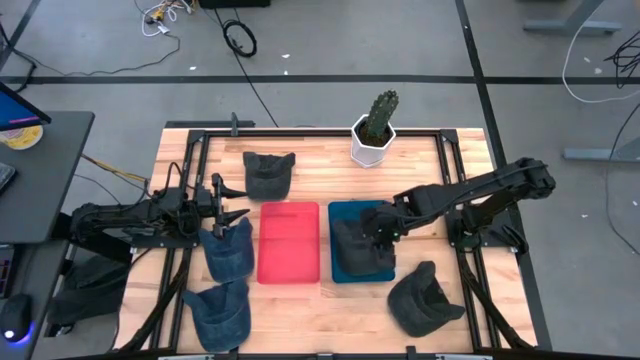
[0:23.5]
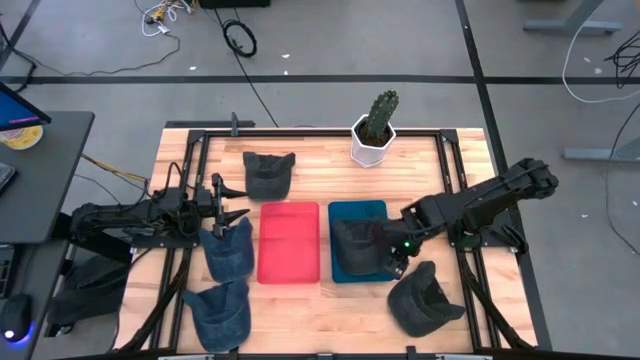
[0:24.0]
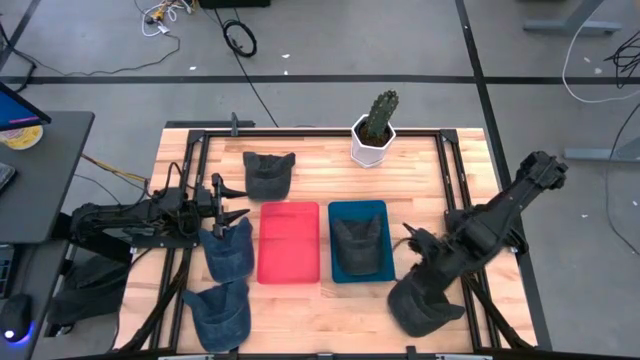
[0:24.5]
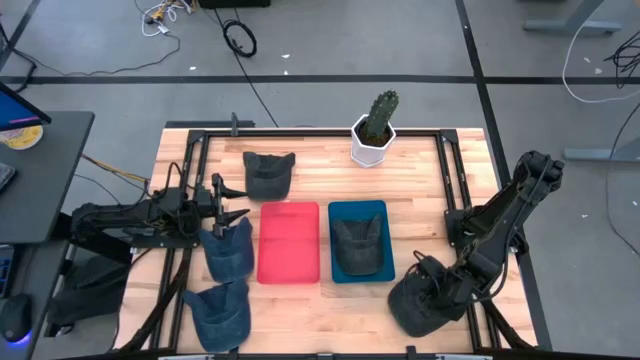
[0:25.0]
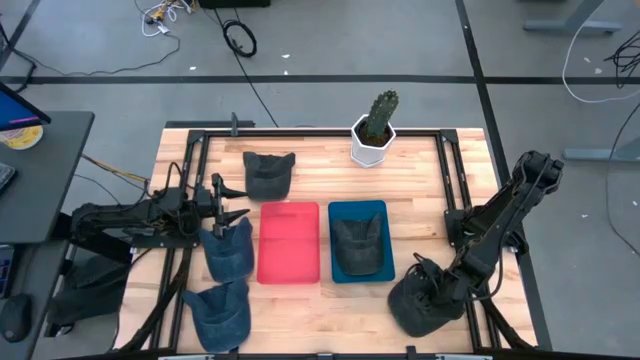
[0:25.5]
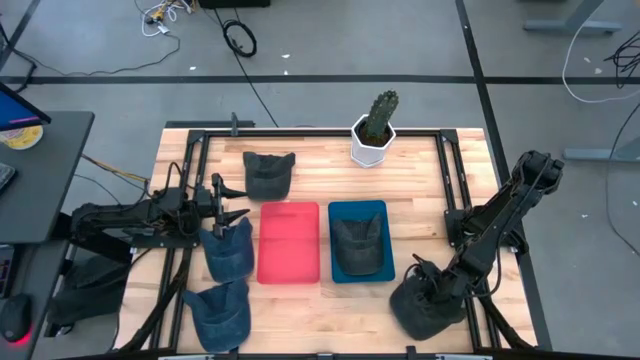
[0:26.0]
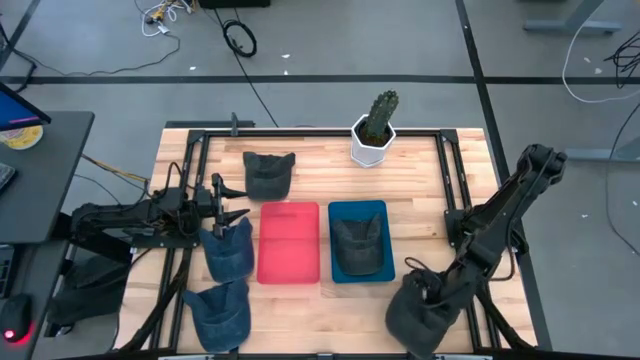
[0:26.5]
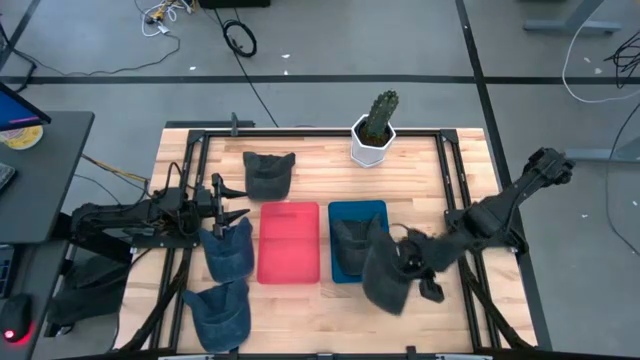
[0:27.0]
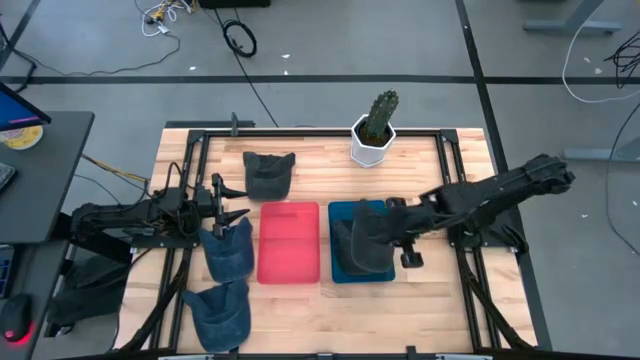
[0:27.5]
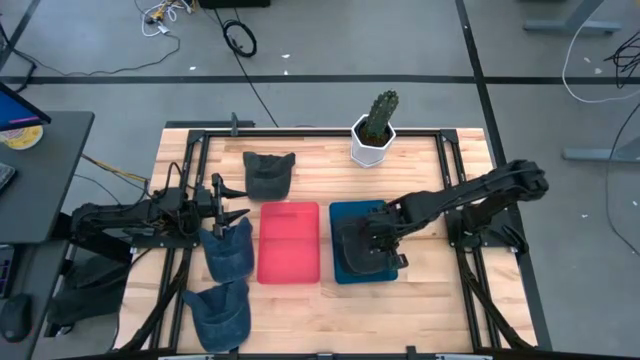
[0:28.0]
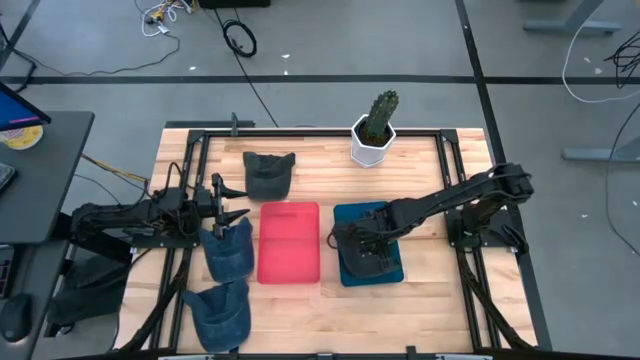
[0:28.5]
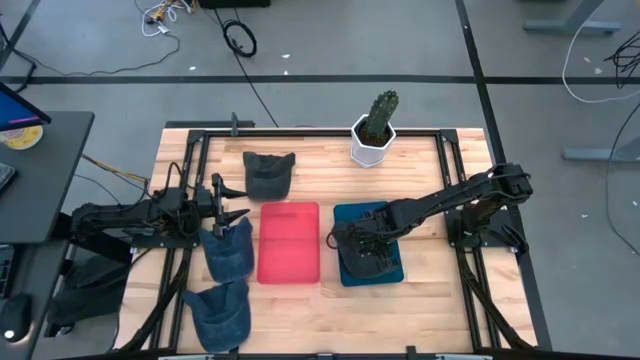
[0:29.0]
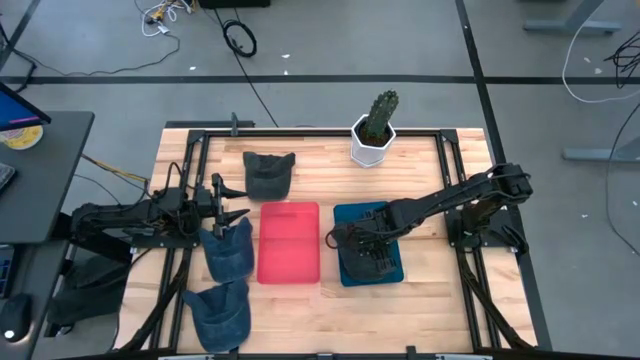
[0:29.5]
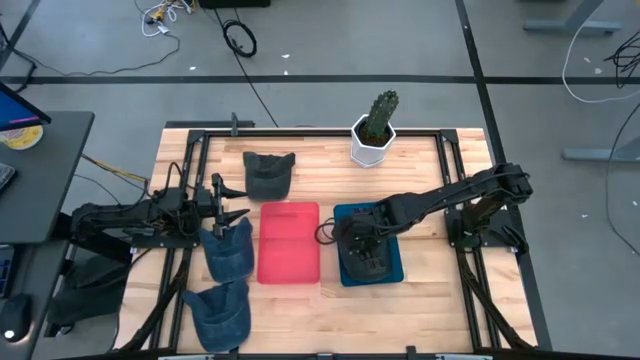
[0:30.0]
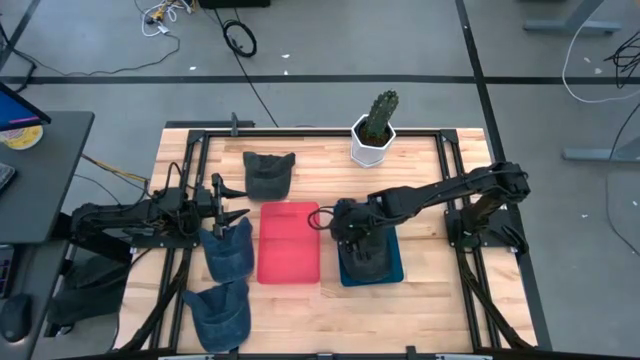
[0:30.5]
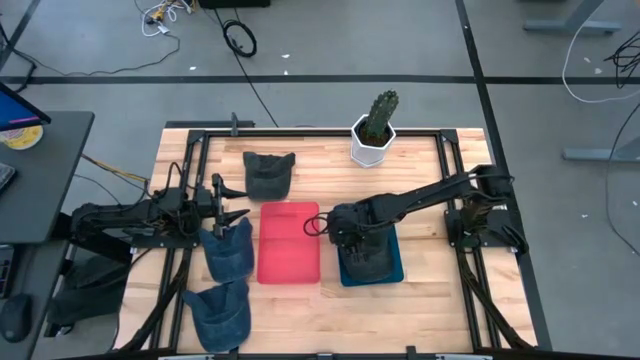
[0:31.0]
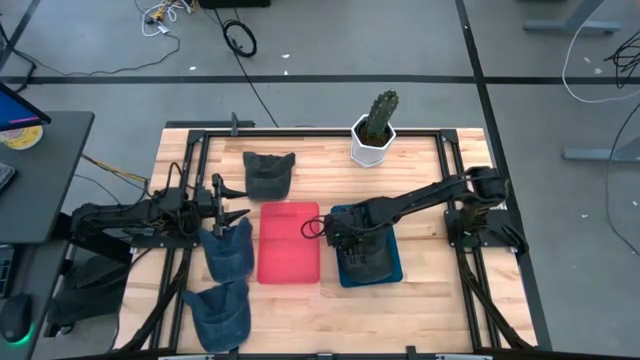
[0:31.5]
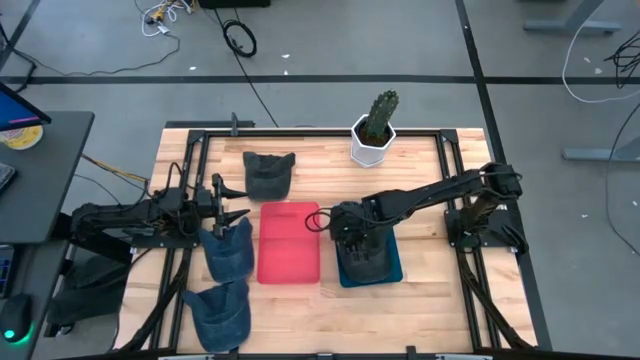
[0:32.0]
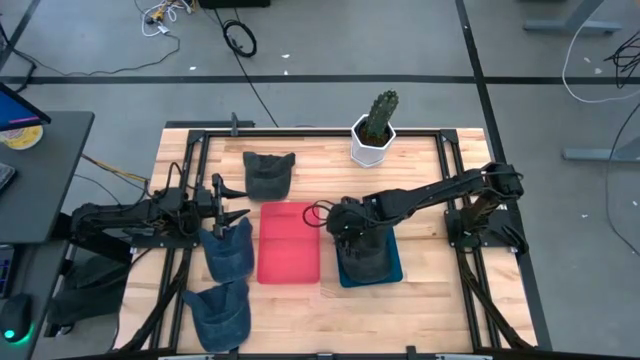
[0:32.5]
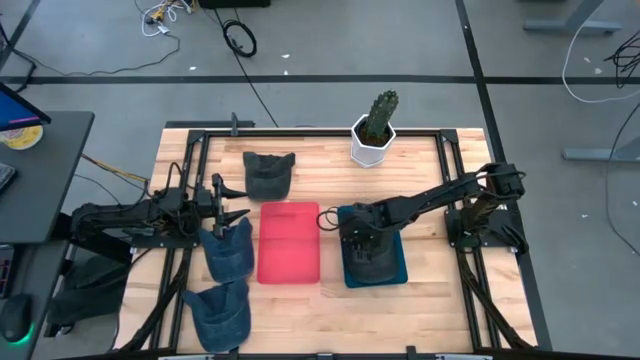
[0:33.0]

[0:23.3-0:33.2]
Task: Pick & Place hat
Put the bottom gray cap into the bin

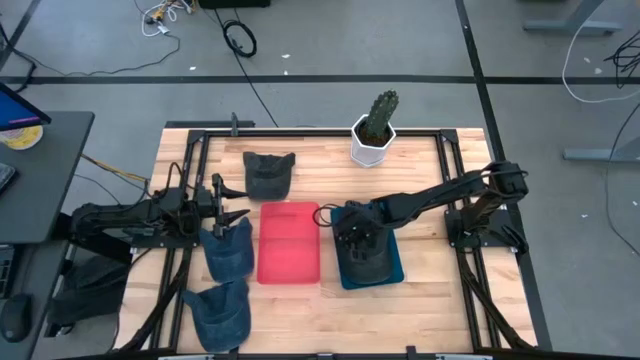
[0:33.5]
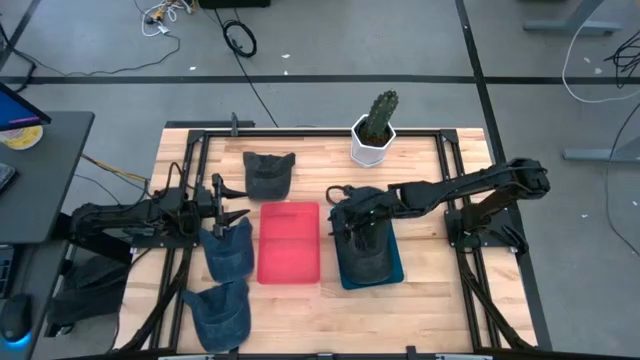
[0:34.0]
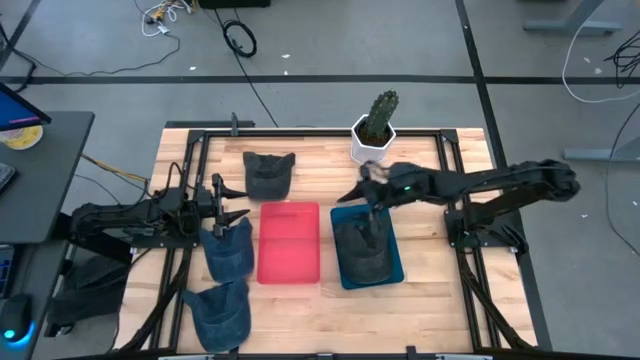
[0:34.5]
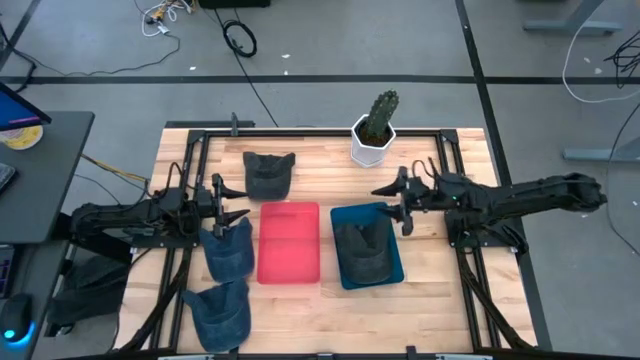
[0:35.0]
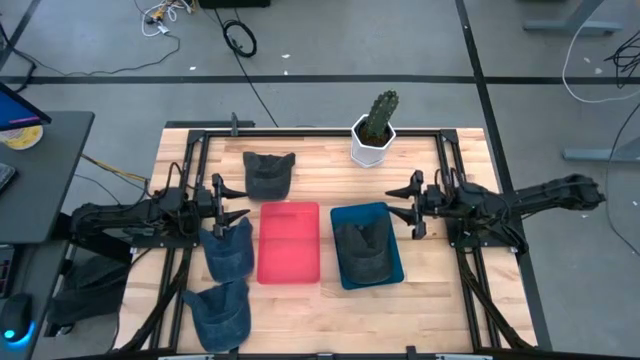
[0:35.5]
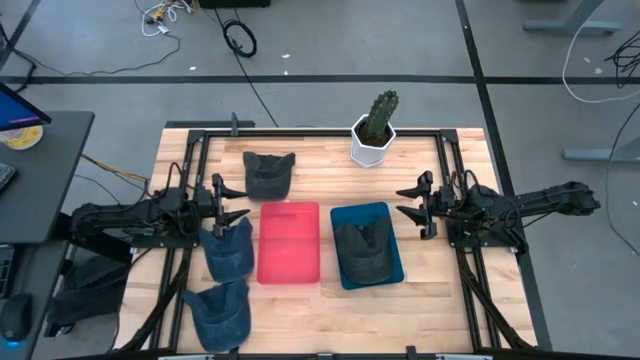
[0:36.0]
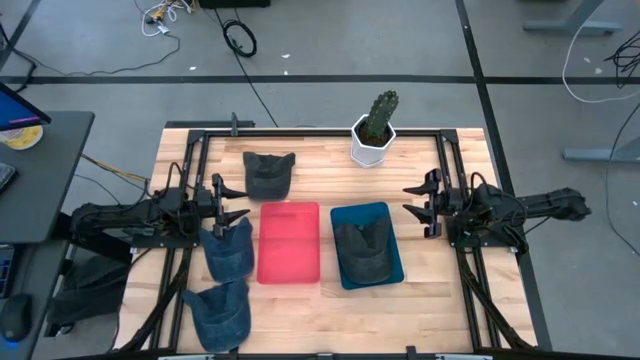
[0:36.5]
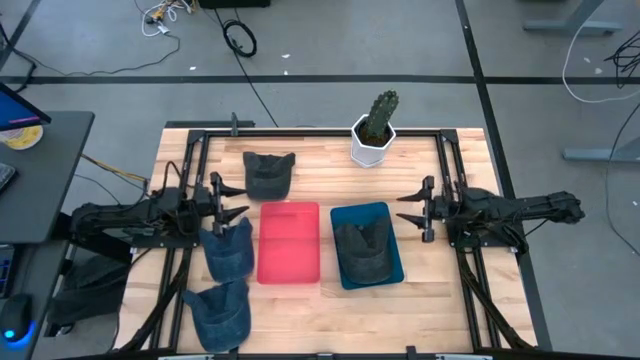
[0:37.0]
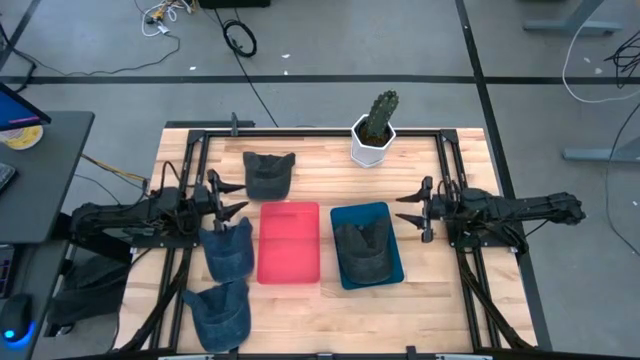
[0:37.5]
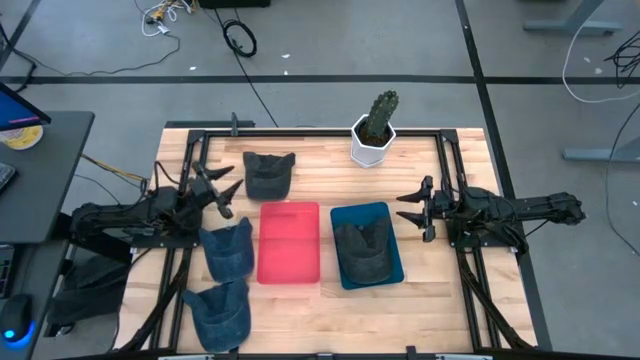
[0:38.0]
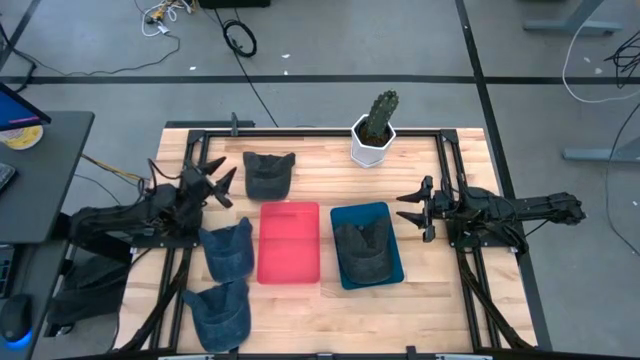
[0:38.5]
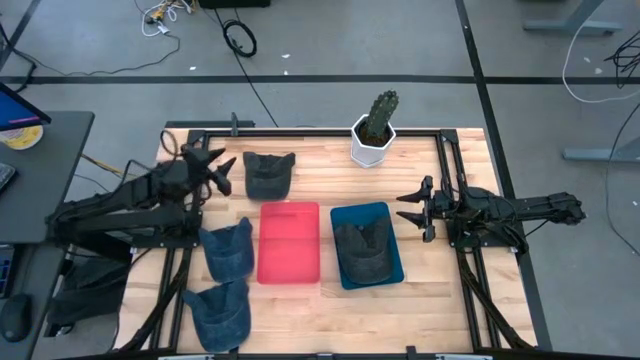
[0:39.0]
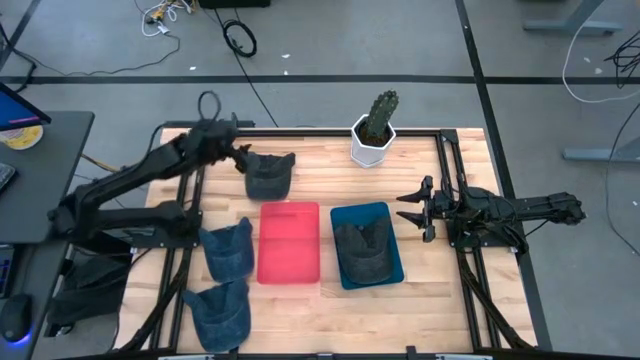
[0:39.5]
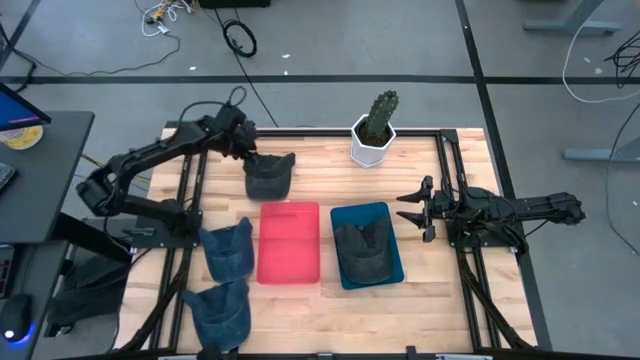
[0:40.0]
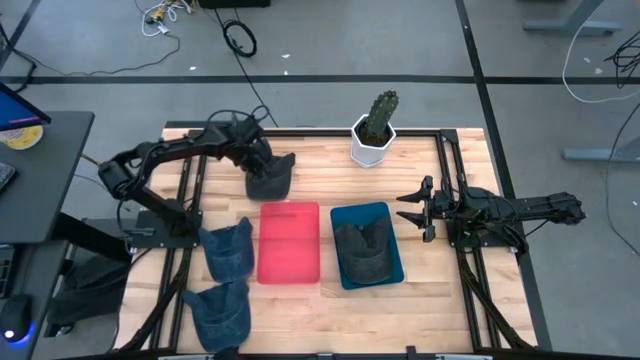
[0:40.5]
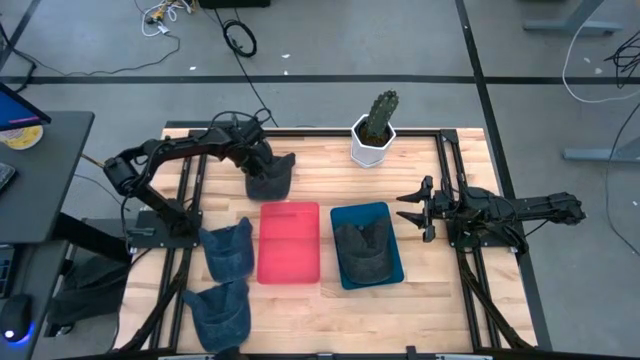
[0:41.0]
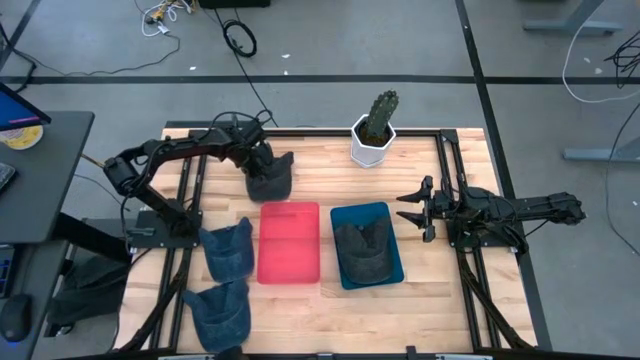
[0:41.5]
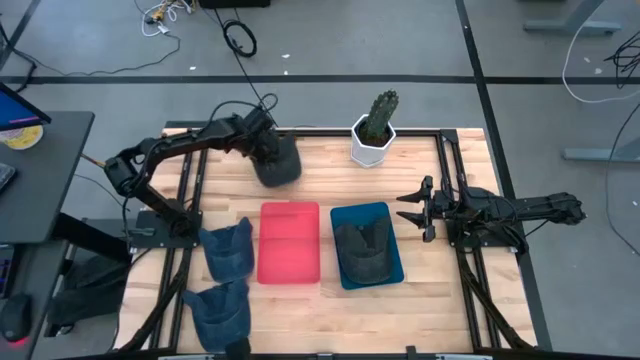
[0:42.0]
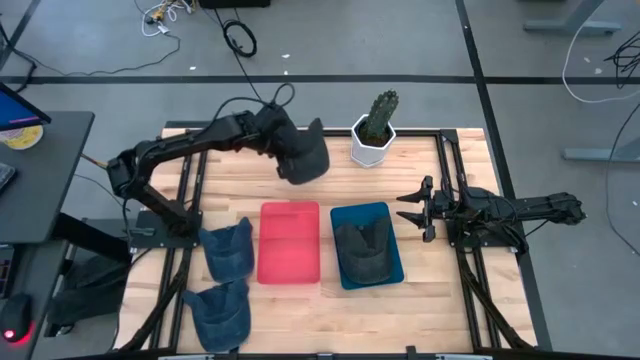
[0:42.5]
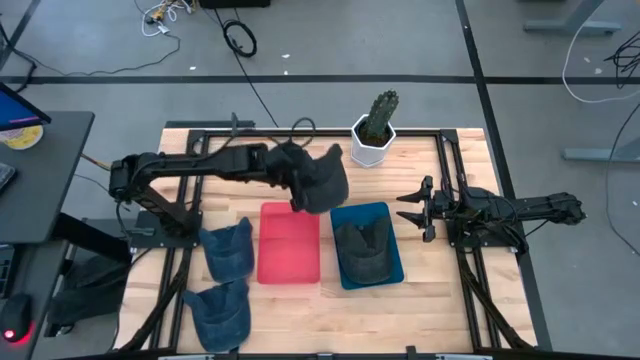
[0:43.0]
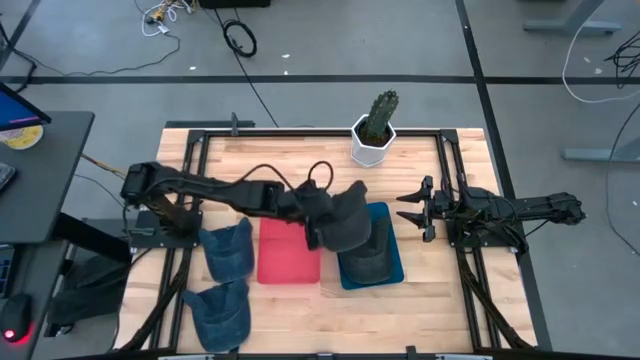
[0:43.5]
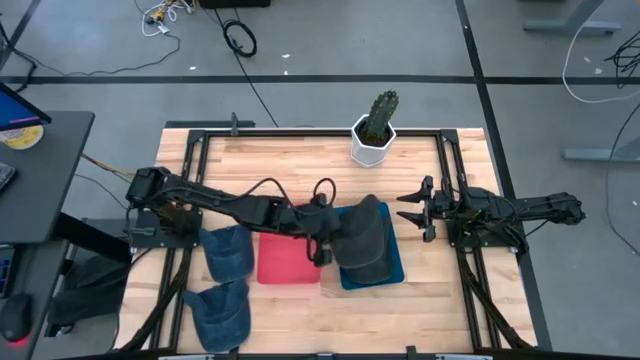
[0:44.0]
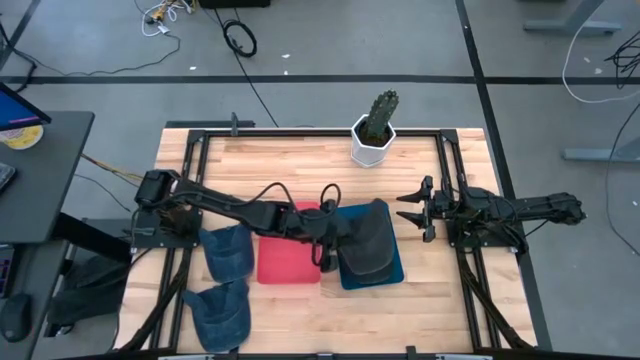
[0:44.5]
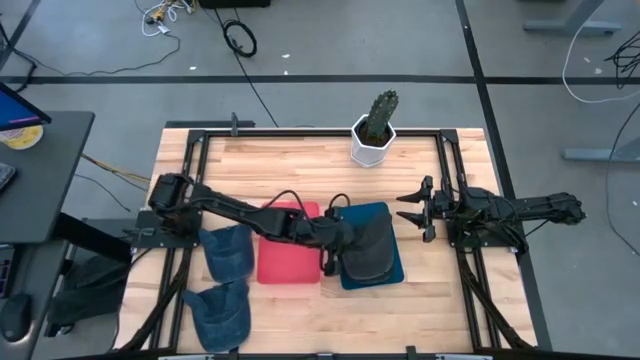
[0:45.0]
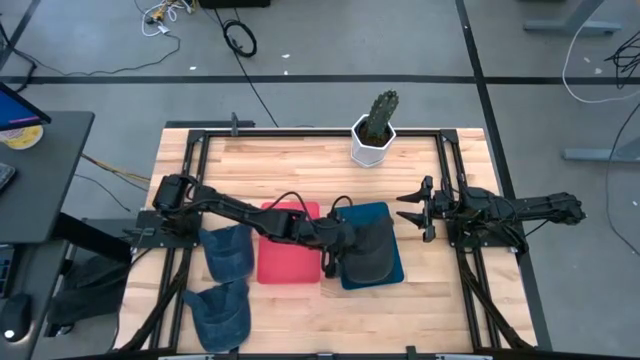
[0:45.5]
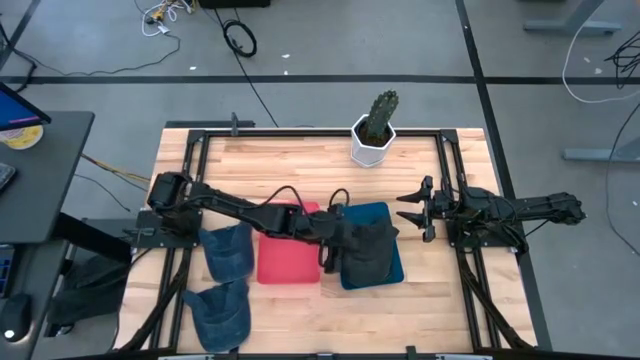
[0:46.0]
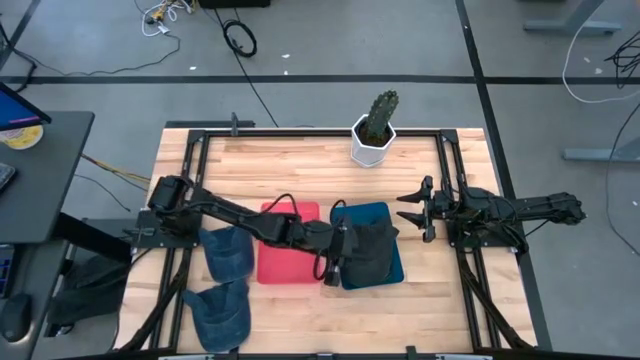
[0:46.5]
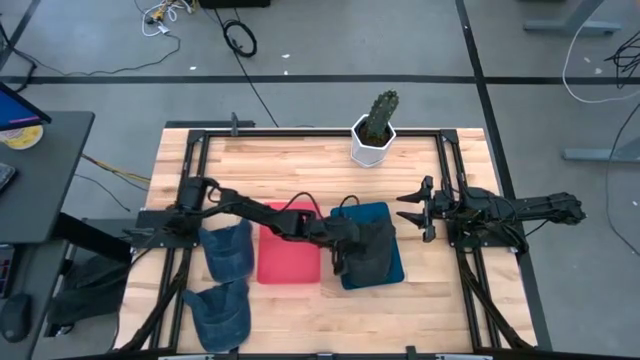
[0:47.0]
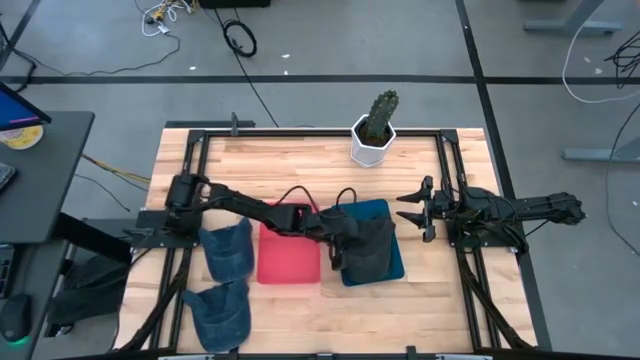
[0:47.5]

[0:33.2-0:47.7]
Put the gray cap into the blue bin
